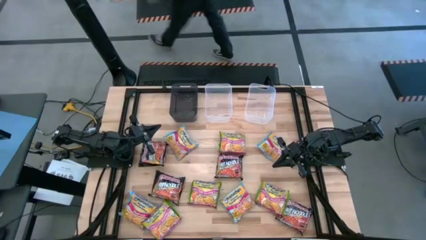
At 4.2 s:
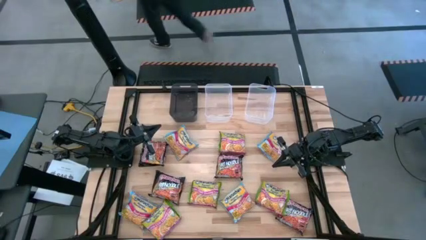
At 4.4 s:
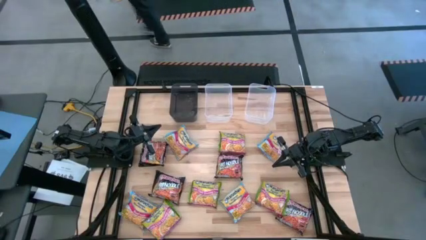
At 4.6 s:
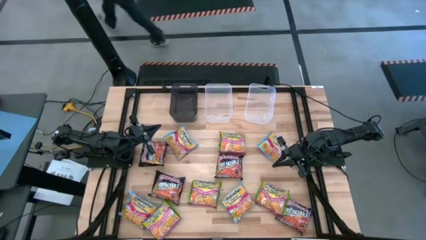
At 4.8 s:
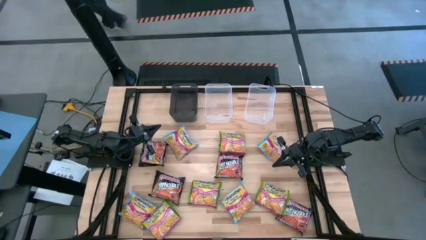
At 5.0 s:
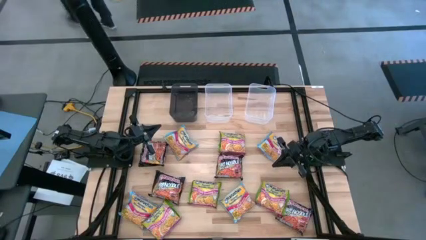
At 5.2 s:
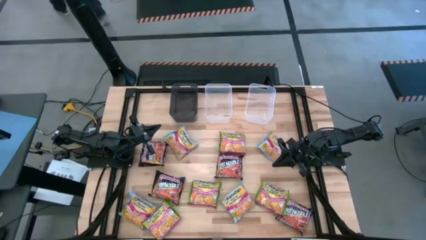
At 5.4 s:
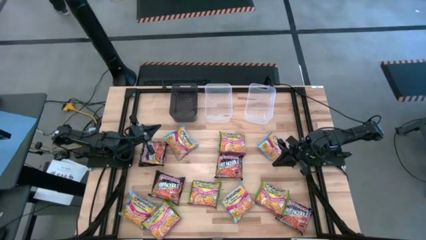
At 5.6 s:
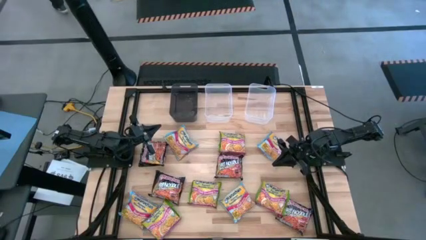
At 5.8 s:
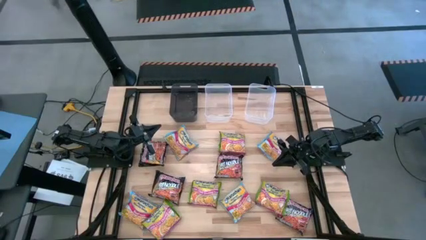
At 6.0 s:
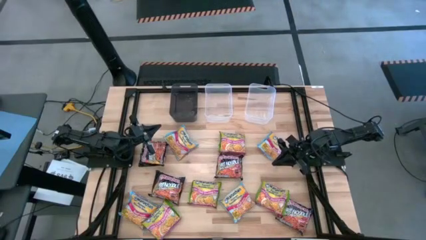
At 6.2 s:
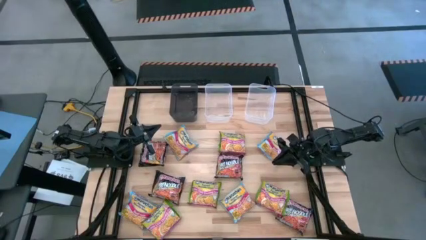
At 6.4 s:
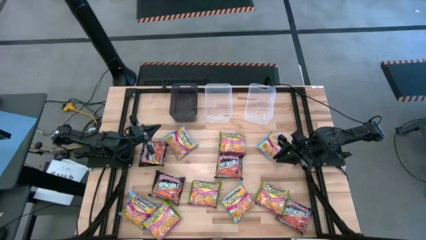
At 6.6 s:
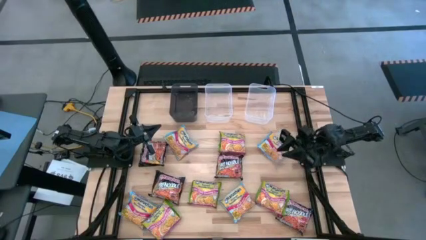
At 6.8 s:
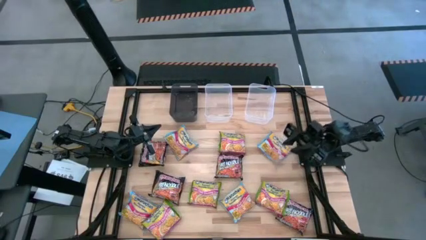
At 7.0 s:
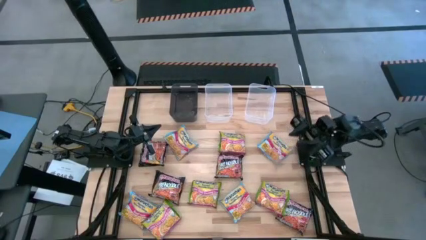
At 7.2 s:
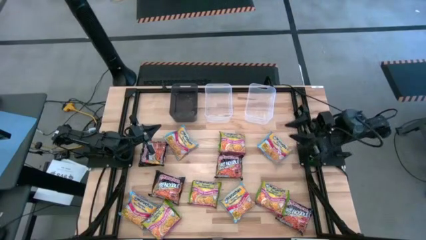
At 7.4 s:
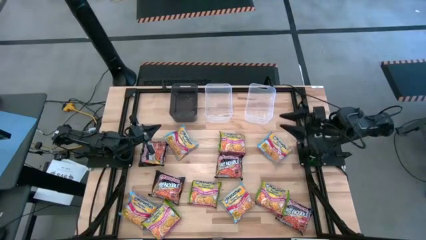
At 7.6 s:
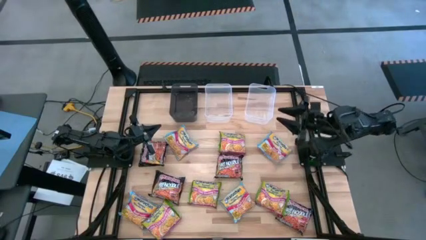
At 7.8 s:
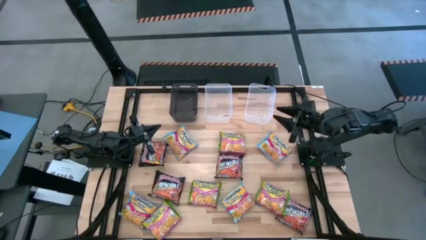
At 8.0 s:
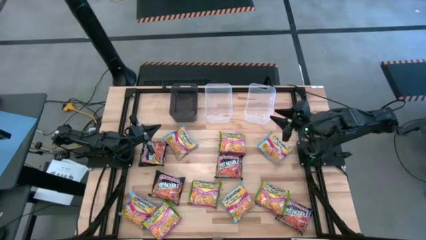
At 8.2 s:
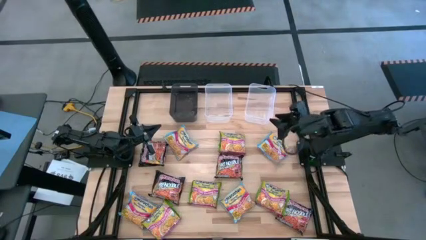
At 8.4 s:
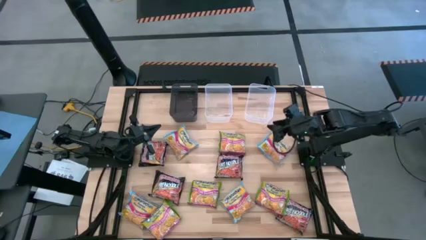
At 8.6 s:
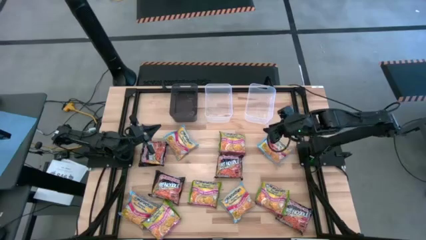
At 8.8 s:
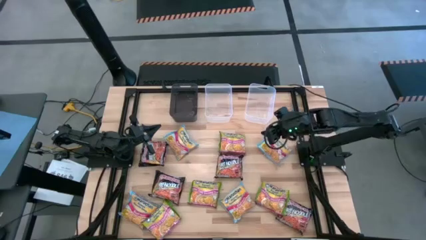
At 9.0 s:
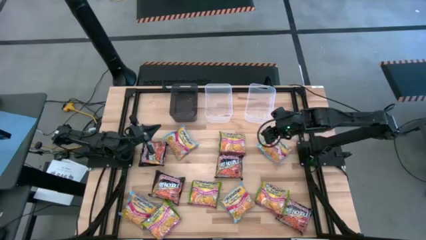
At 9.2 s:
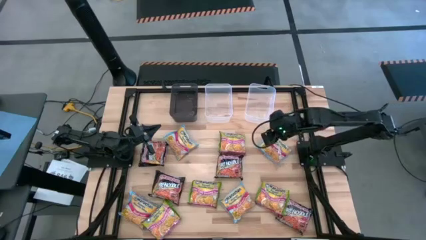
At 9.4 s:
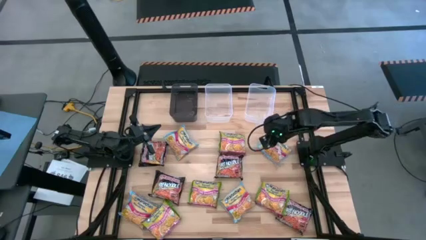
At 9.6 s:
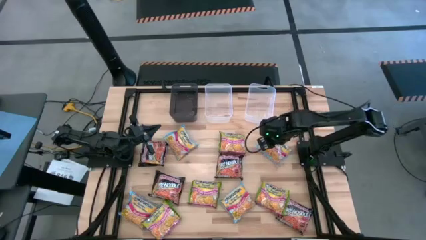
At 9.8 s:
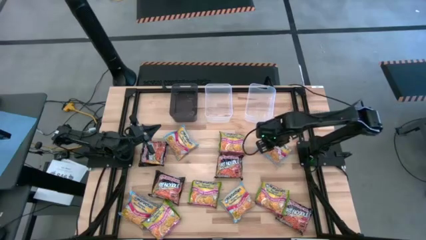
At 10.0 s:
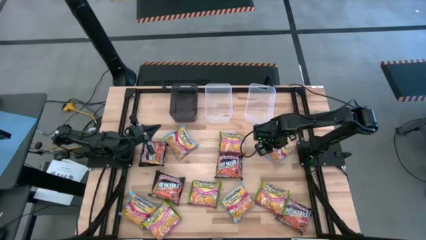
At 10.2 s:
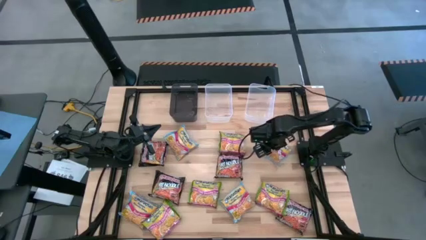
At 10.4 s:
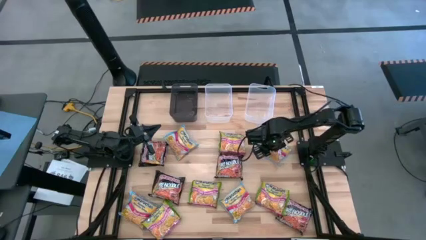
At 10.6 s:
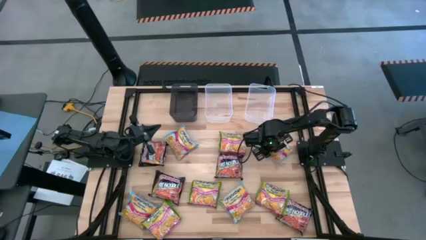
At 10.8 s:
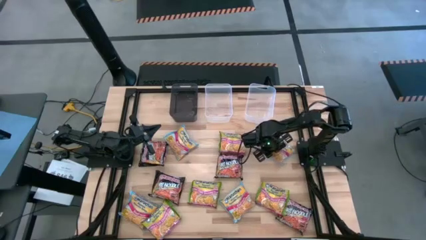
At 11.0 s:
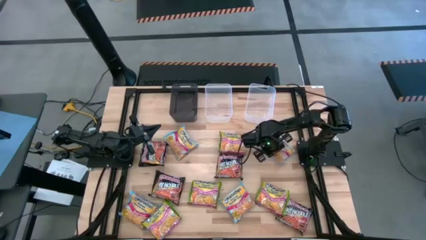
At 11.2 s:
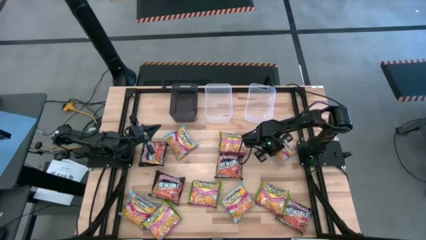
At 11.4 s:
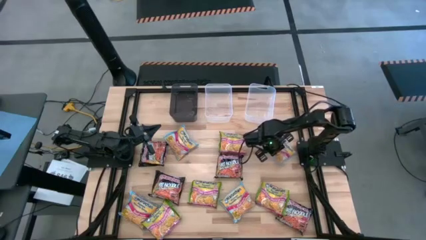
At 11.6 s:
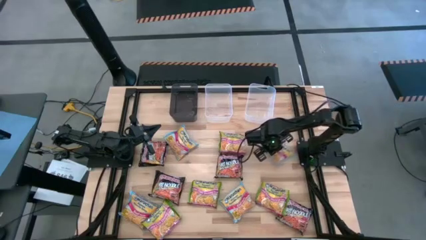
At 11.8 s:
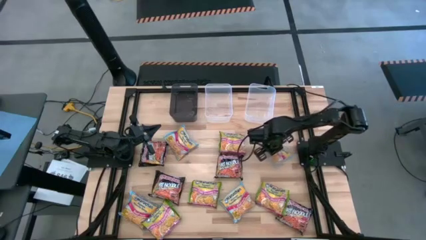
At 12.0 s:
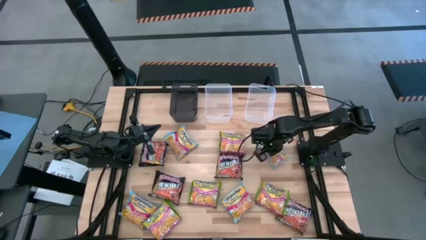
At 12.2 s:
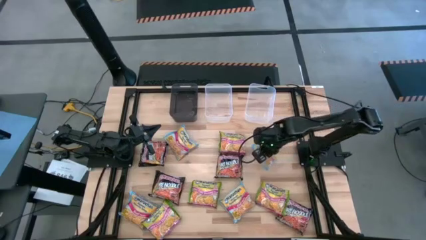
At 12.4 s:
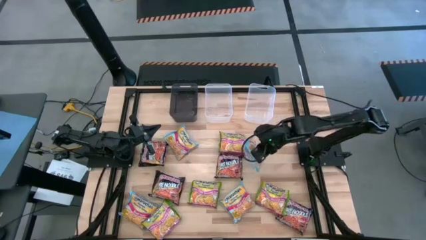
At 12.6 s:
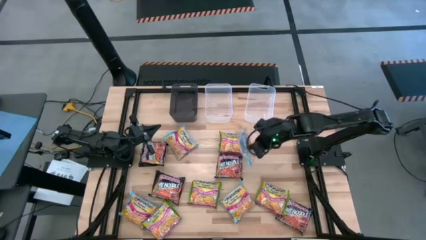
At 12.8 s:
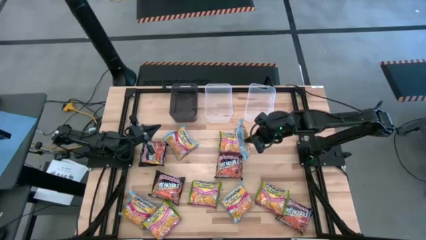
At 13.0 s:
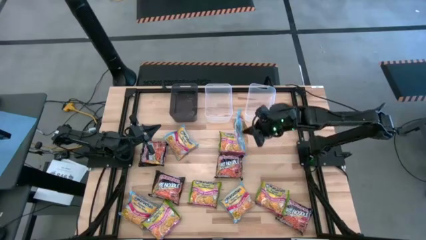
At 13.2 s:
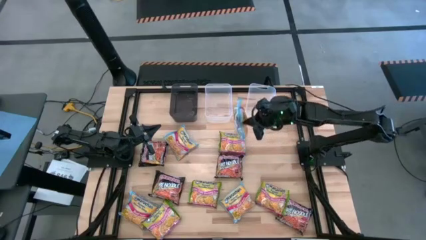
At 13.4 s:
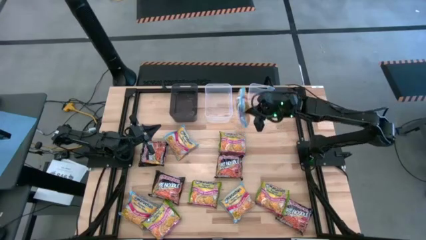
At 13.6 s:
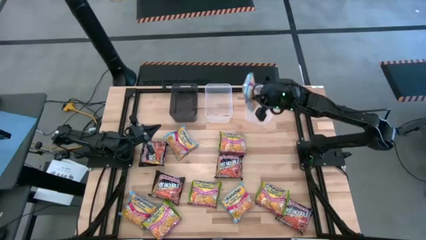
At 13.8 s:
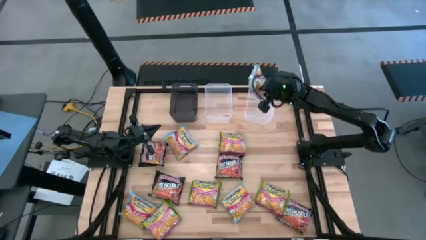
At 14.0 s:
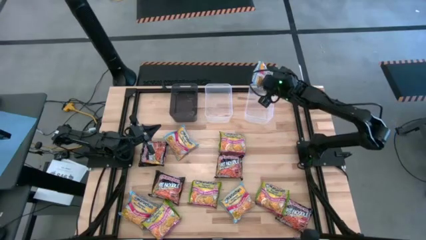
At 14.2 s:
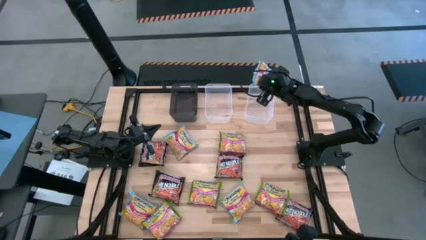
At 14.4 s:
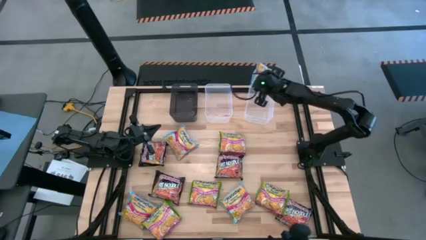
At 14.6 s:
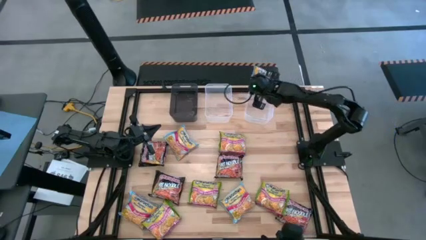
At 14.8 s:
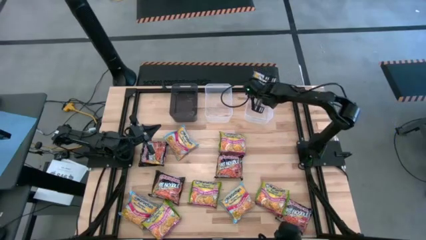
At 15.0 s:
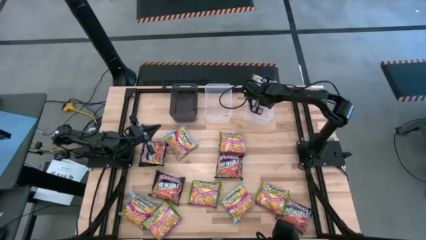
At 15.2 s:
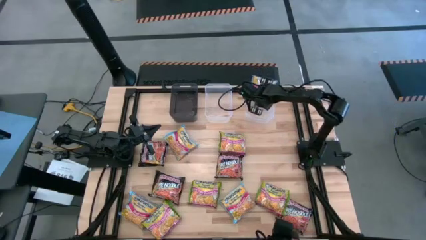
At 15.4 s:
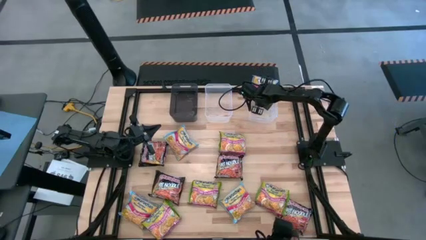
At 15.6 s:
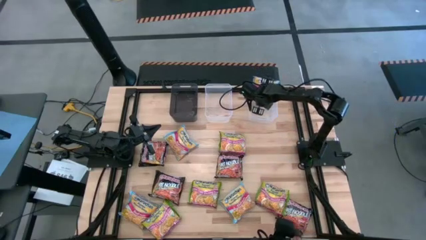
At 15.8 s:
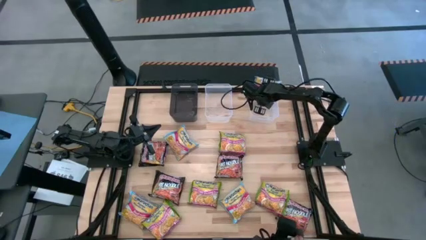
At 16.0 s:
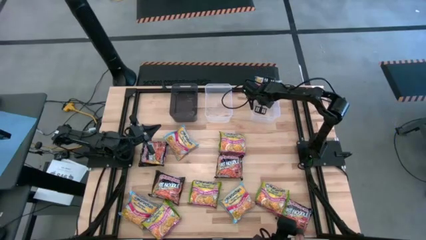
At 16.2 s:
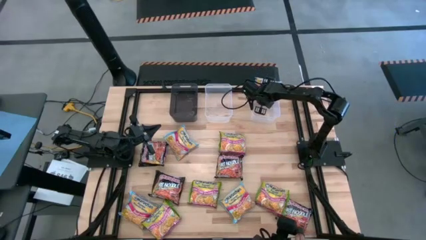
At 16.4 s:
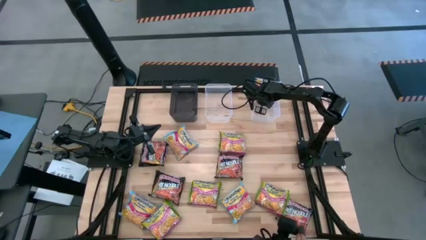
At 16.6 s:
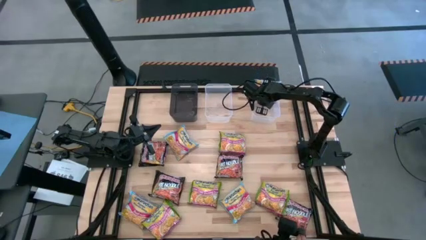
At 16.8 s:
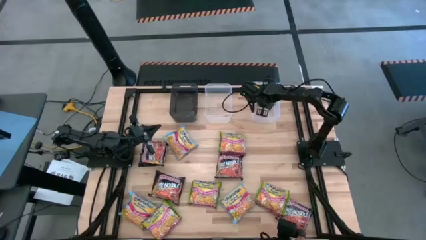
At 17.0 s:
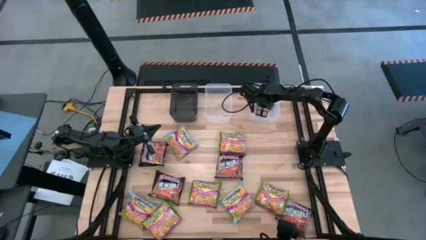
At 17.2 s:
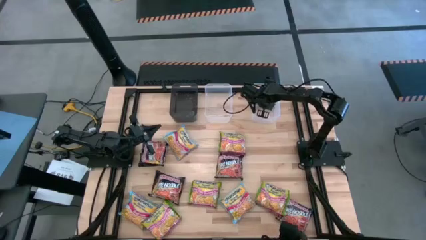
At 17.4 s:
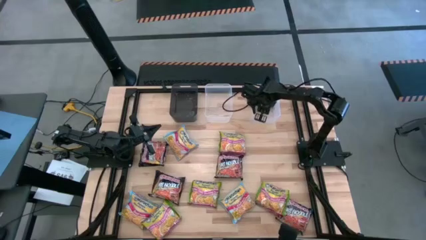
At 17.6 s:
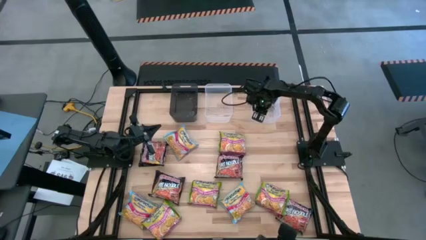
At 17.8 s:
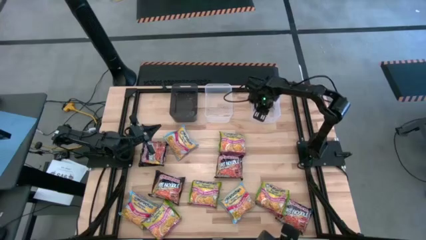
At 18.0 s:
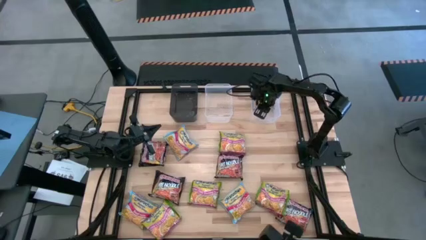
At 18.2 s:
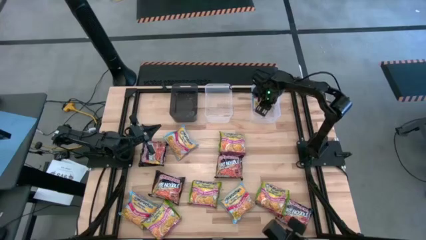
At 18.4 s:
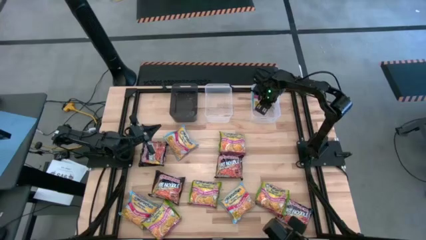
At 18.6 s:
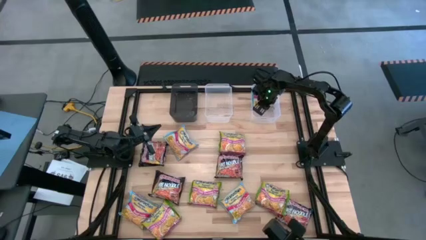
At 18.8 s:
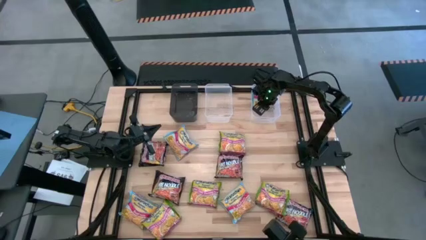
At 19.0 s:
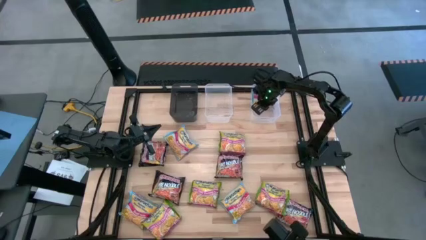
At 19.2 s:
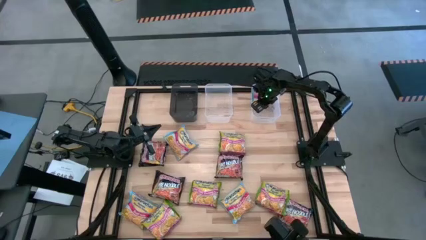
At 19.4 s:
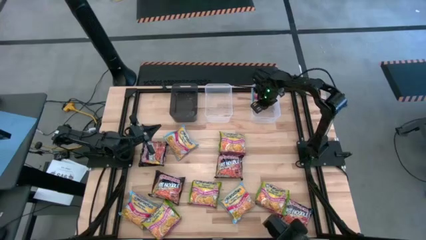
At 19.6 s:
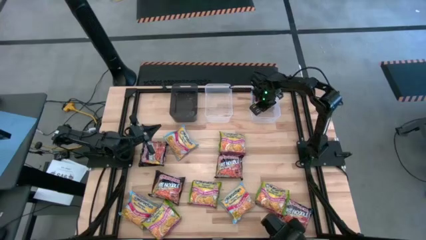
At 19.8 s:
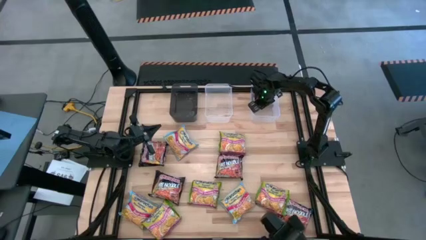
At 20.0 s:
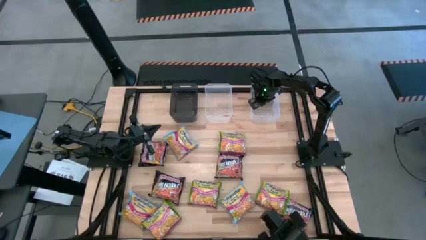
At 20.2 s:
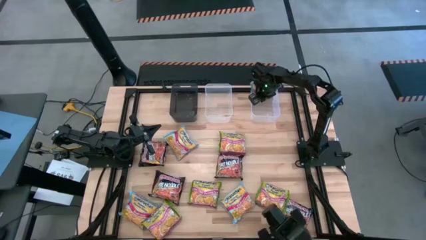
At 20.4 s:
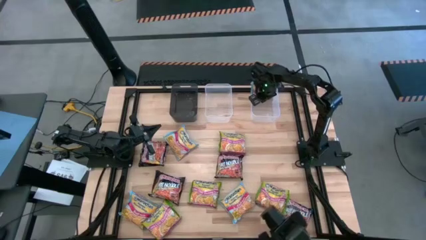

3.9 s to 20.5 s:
Task: Sort Maruchan noodles
Put the blue noodle pack into the right transparent bin
